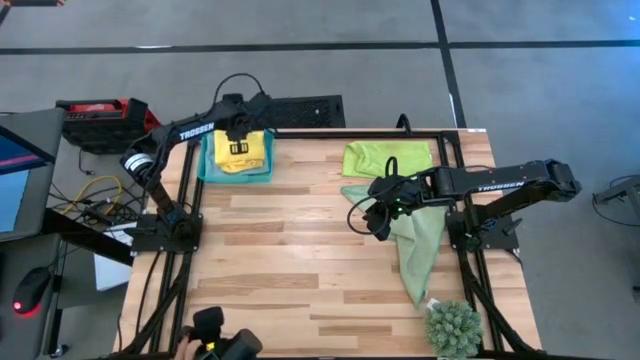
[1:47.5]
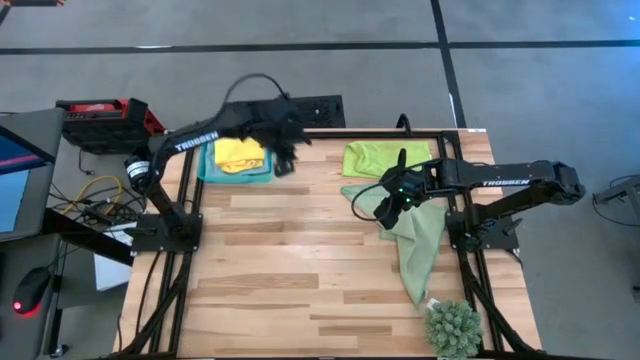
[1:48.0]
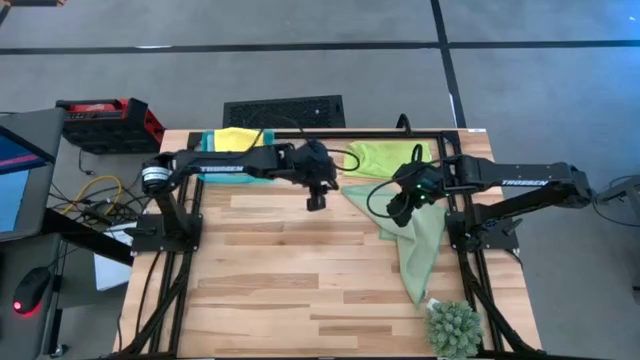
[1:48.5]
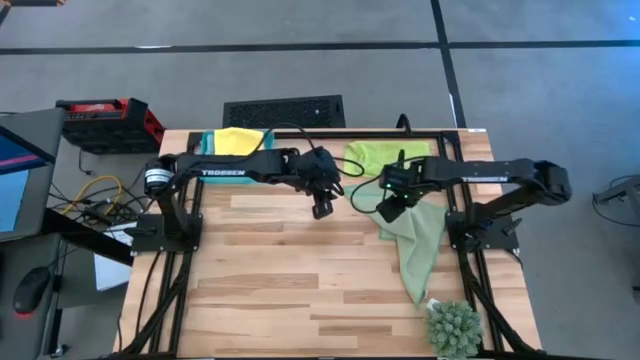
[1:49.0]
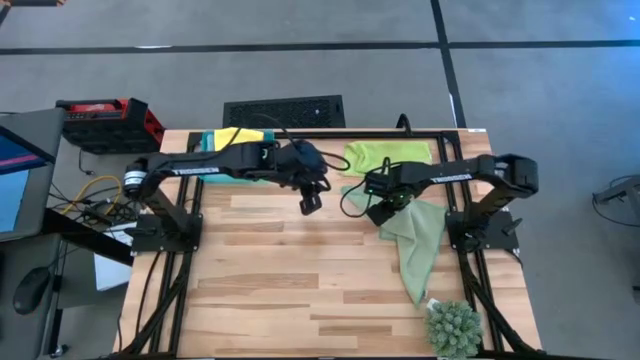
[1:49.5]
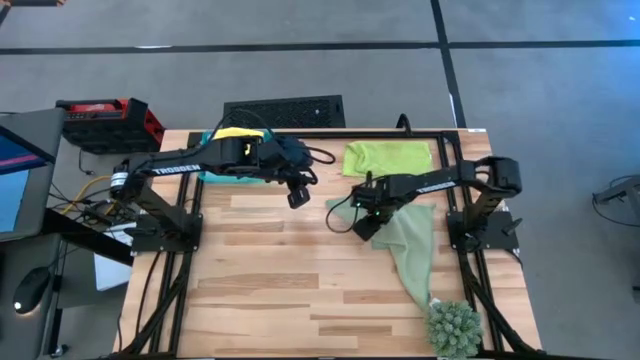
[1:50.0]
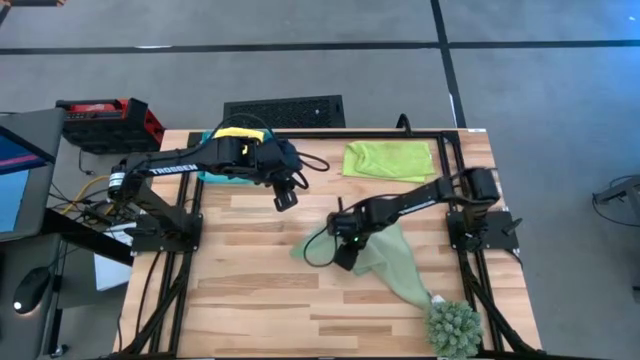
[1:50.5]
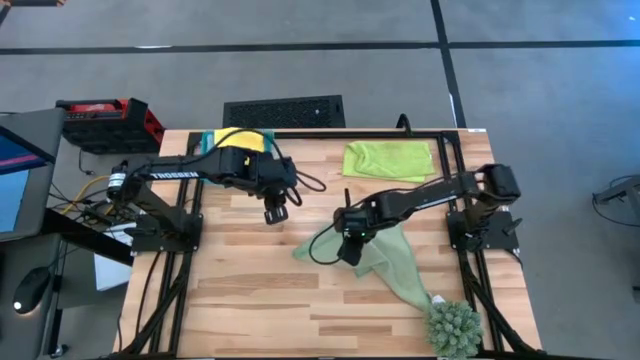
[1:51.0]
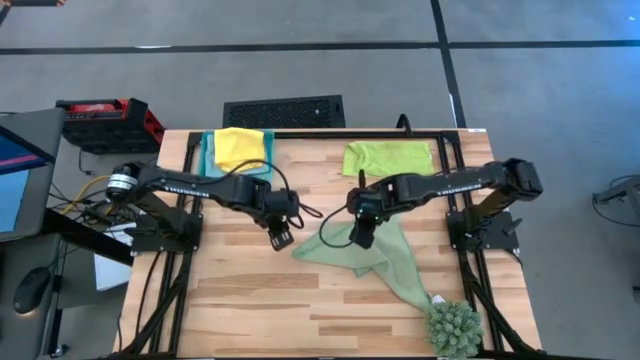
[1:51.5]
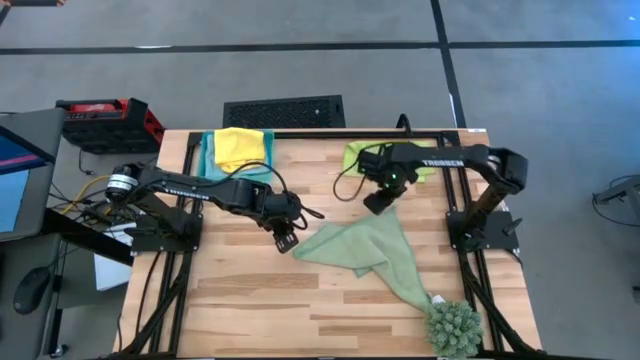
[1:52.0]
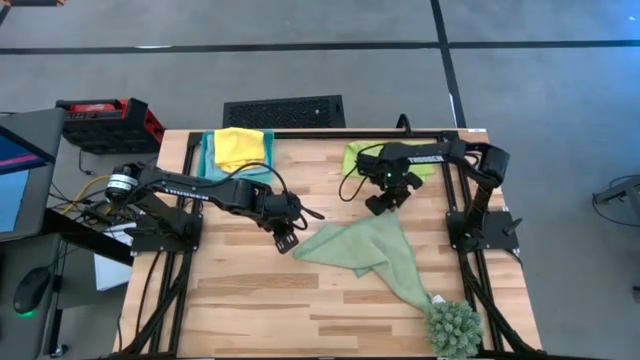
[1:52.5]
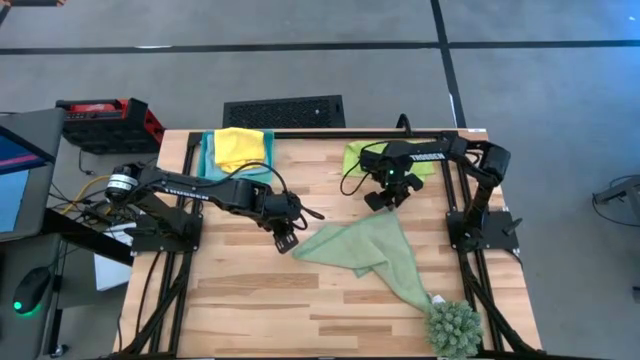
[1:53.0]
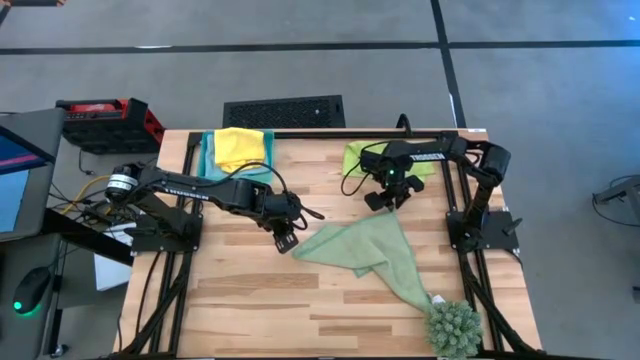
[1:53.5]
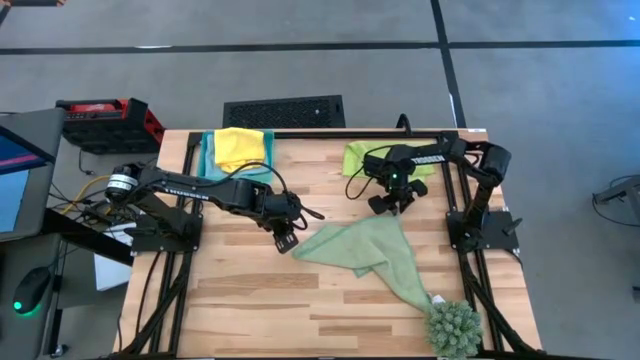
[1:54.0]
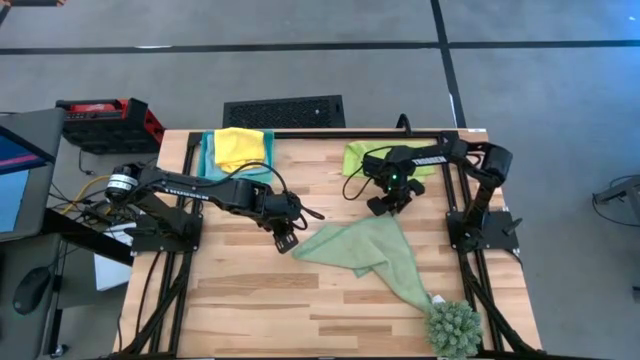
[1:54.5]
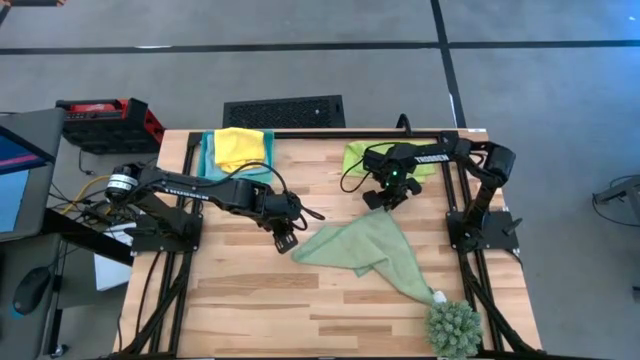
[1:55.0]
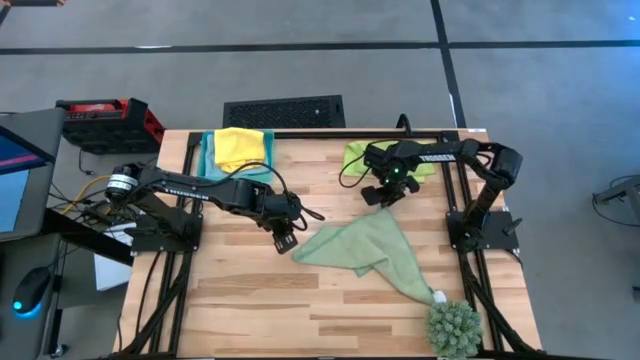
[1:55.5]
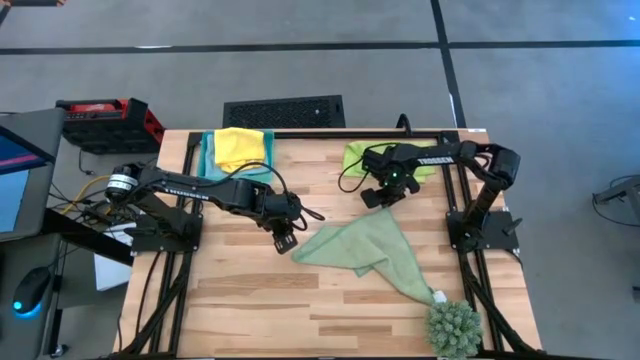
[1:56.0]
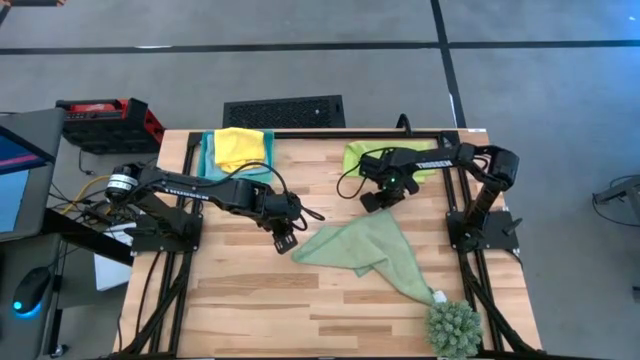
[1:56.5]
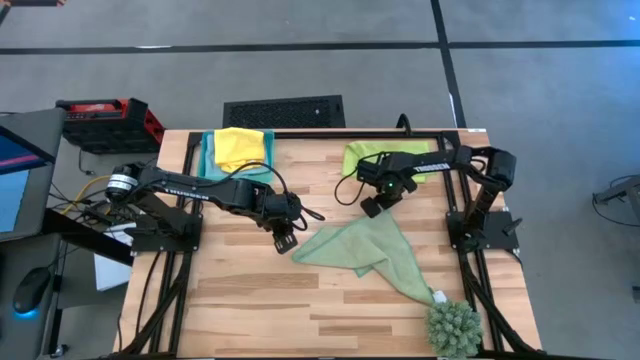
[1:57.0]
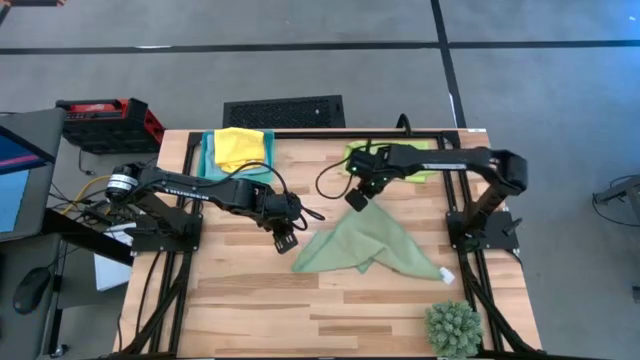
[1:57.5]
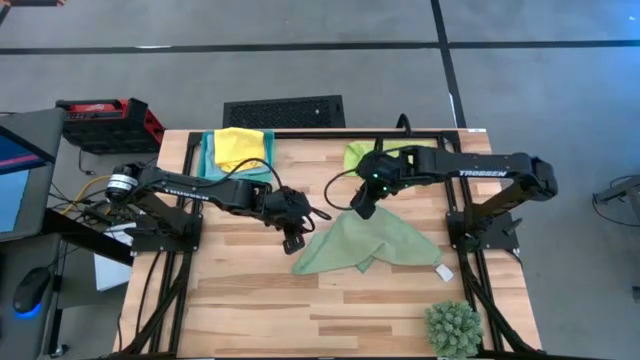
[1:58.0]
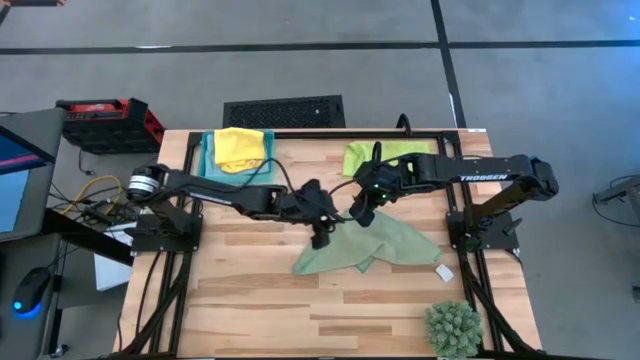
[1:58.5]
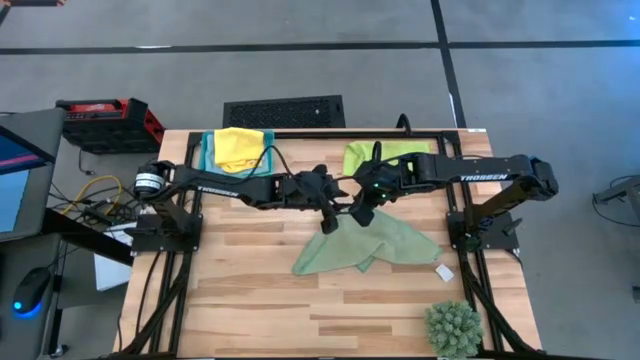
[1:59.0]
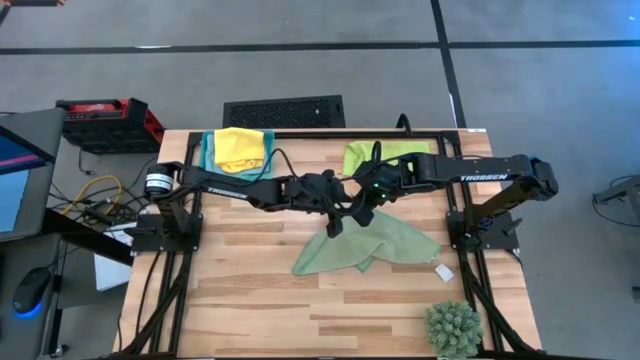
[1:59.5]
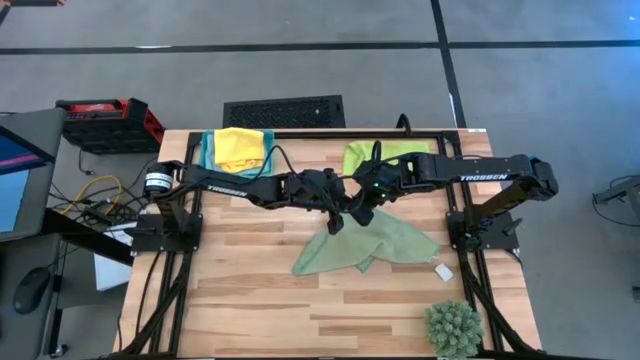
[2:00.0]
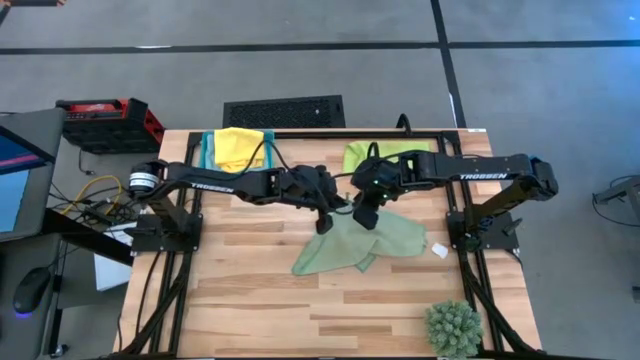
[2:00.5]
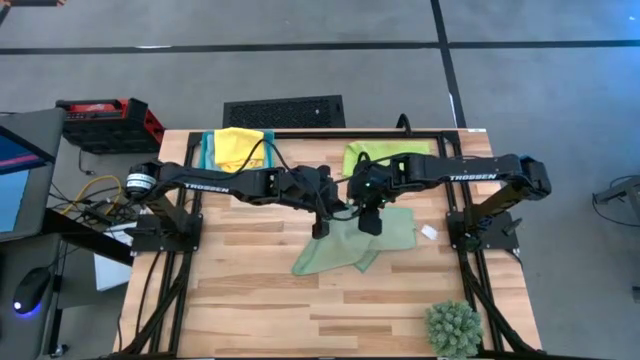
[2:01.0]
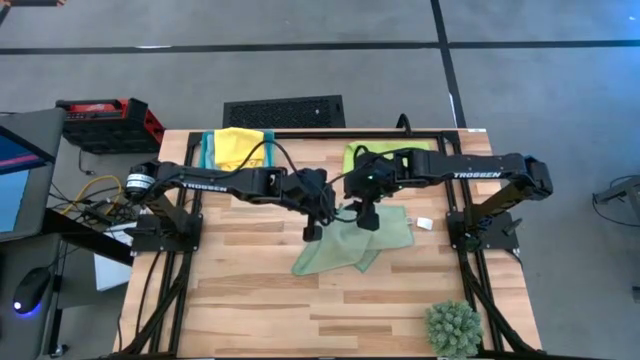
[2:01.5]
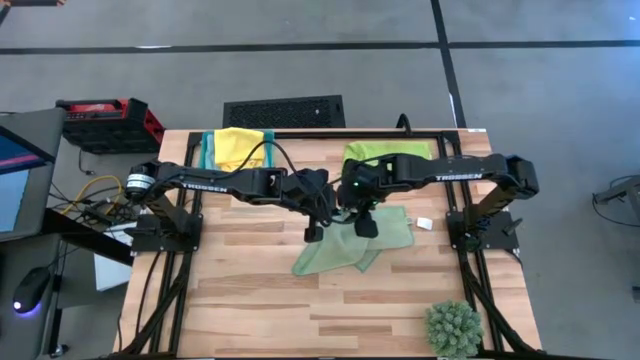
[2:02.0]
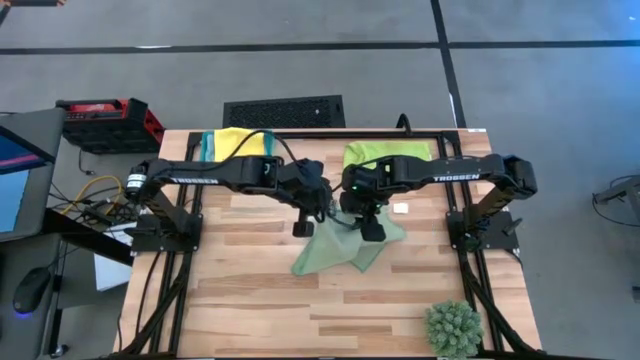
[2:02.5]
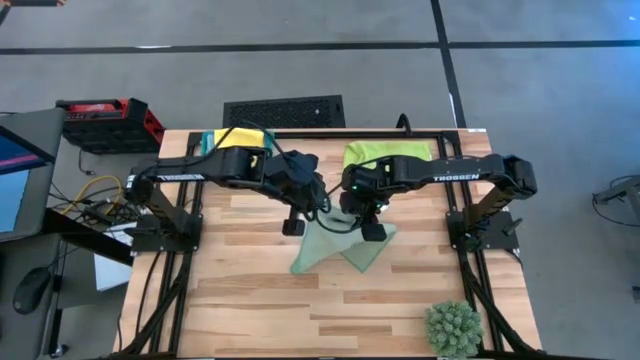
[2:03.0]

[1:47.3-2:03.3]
Task: Fold microfiber towels
Fold the green microfiber towel

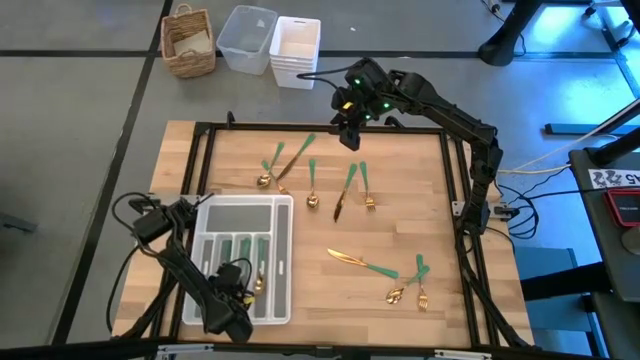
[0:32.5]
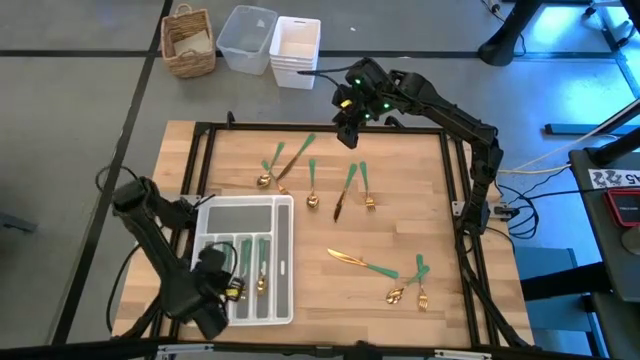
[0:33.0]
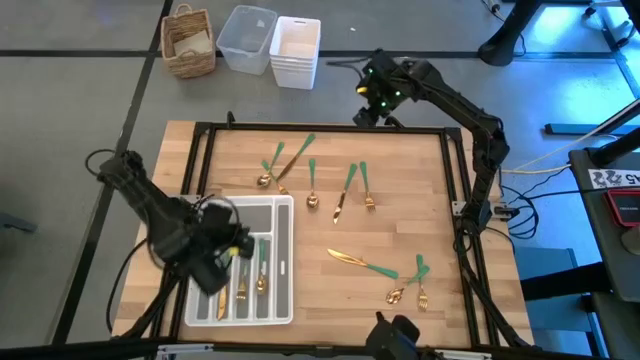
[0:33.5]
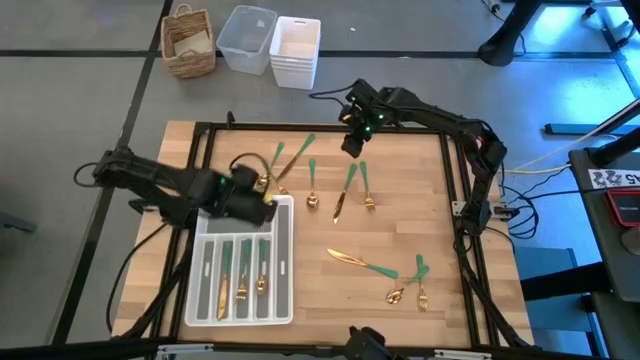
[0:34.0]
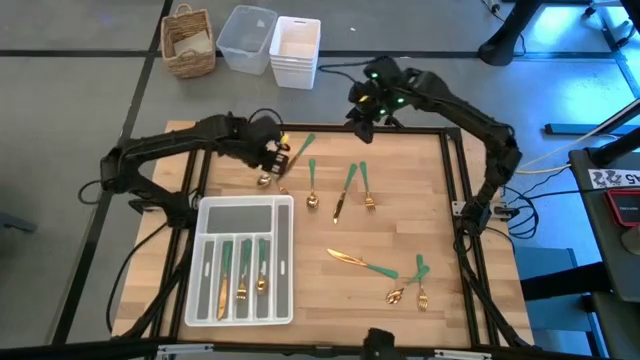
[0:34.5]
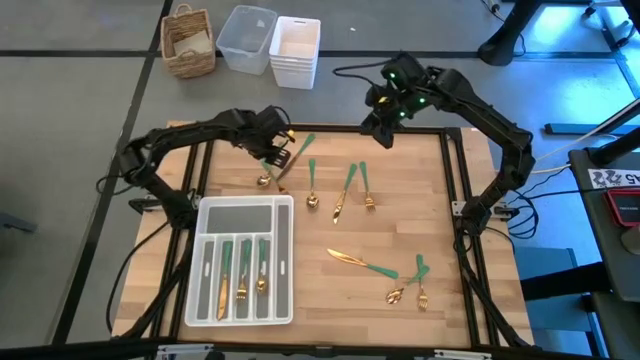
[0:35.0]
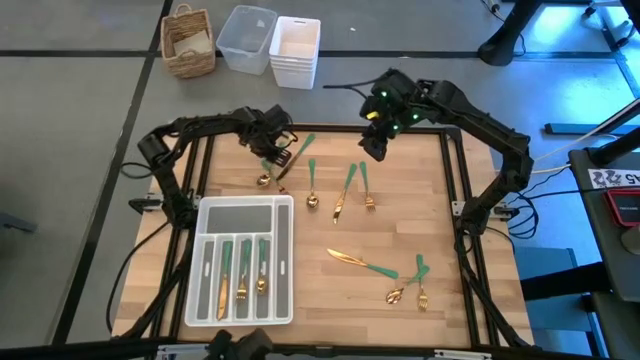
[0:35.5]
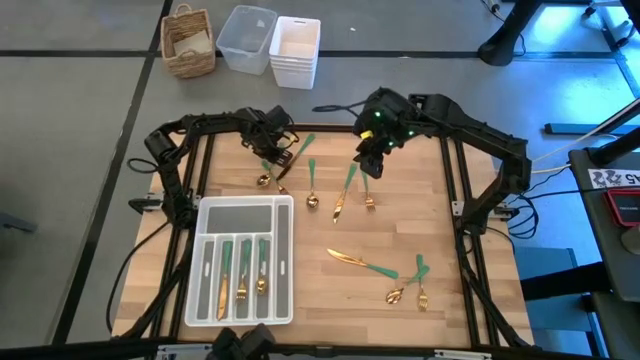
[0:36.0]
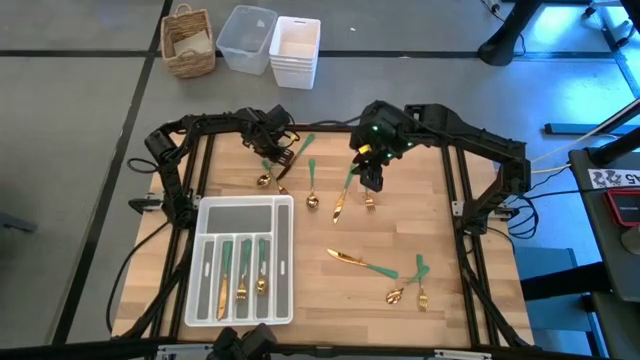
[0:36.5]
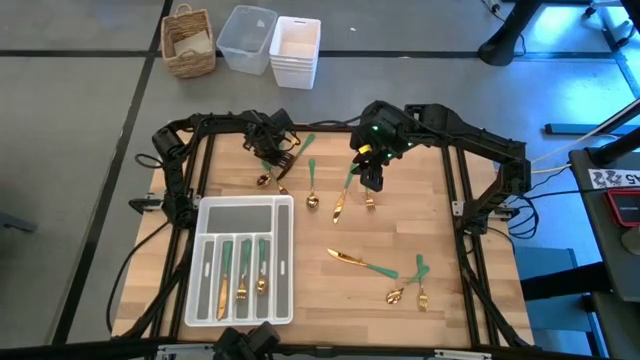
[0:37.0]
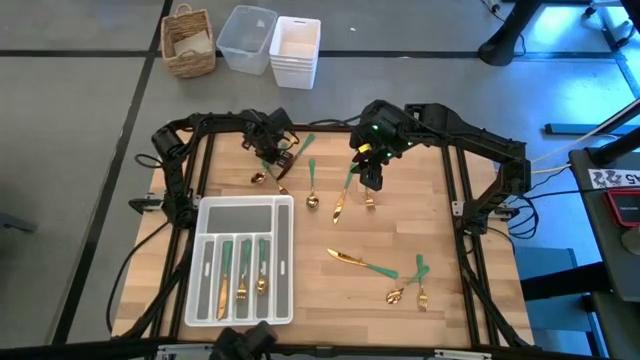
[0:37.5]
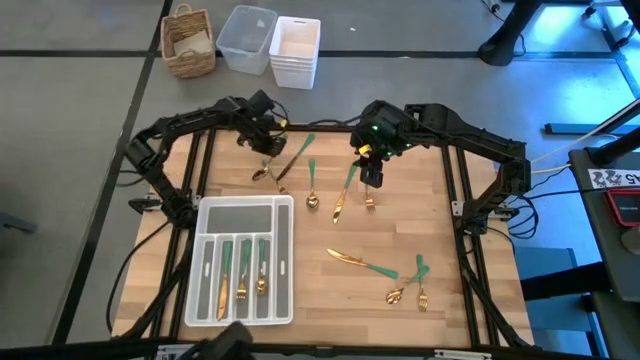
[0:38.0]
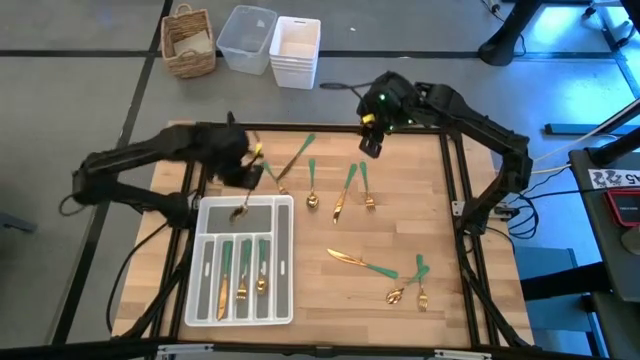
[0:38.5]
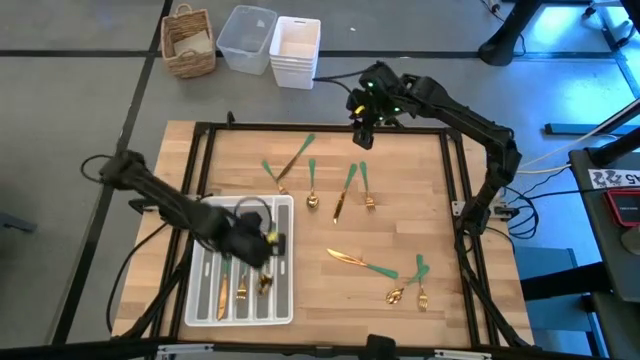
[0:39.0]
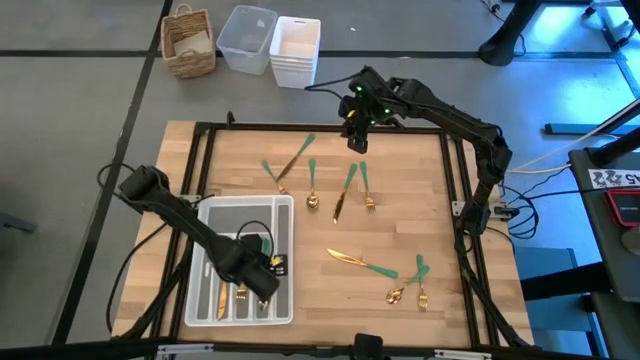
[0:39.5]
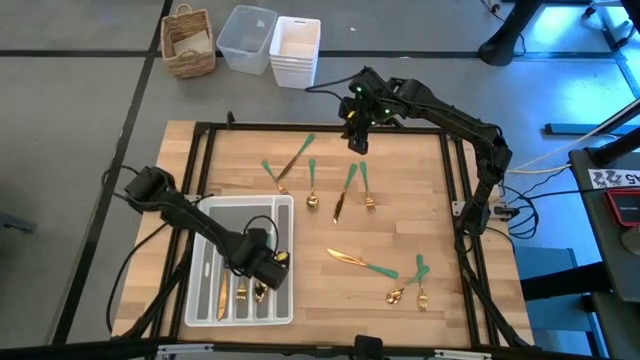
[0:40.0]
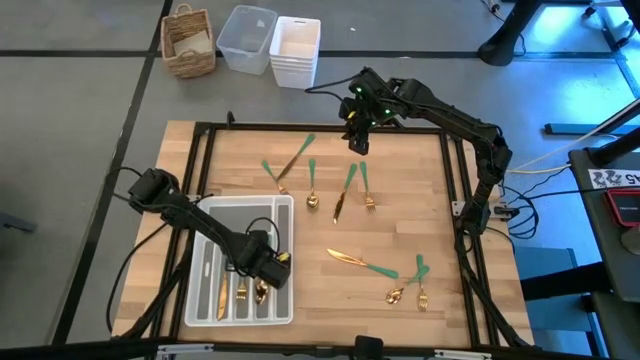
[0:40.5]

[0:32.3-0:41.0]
Task: Sort silverware
Put the green spoon on the silverware tray
